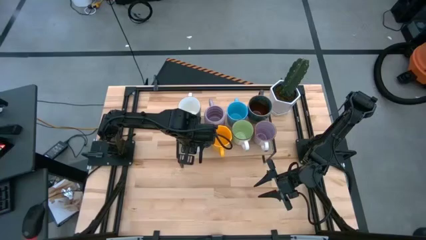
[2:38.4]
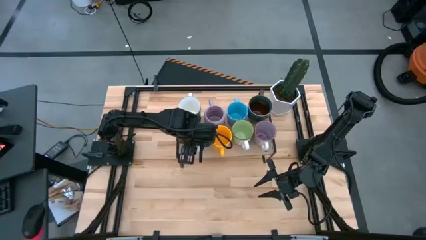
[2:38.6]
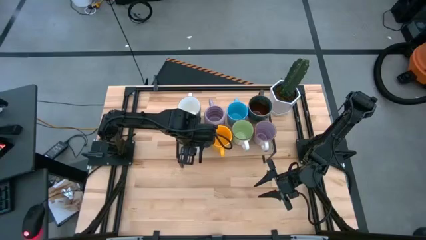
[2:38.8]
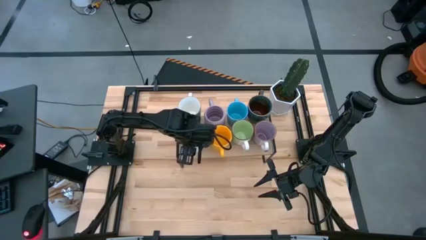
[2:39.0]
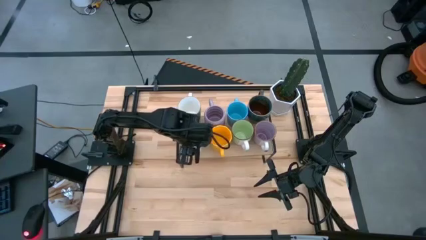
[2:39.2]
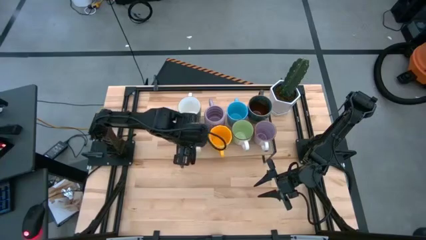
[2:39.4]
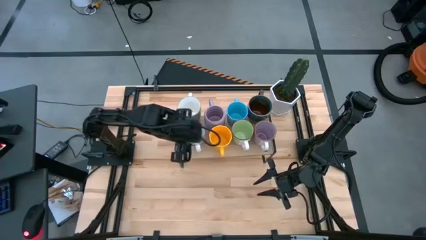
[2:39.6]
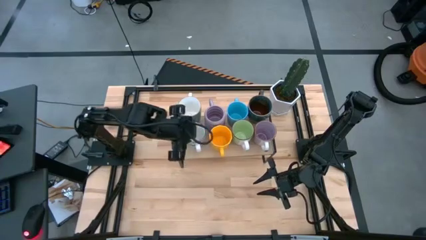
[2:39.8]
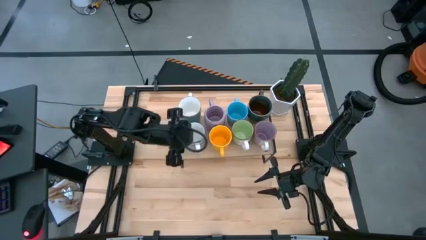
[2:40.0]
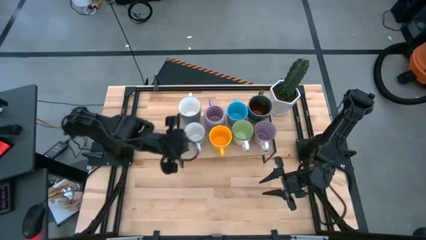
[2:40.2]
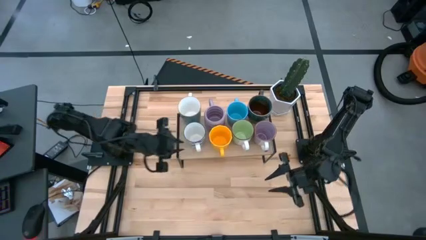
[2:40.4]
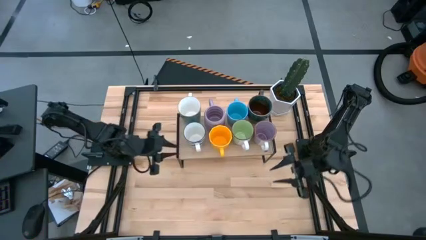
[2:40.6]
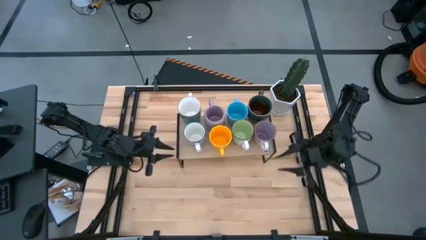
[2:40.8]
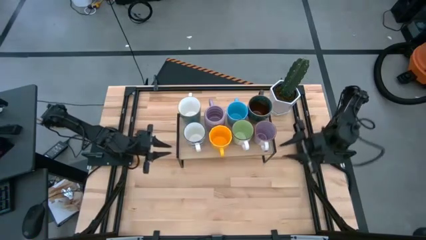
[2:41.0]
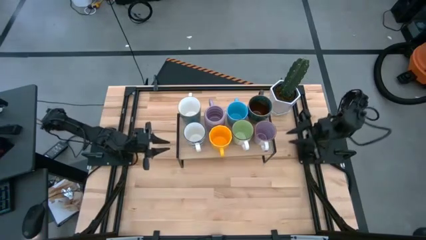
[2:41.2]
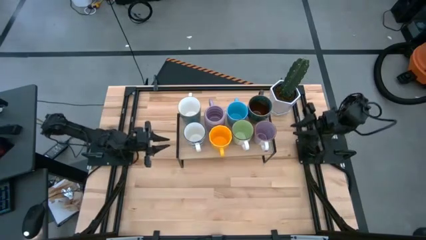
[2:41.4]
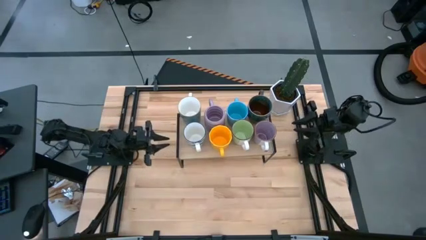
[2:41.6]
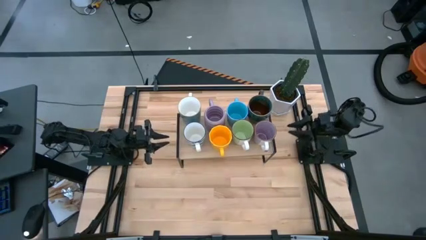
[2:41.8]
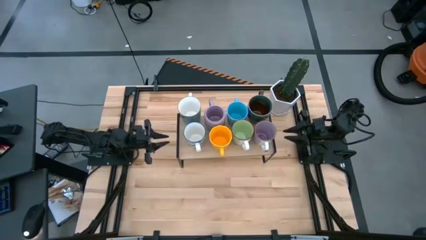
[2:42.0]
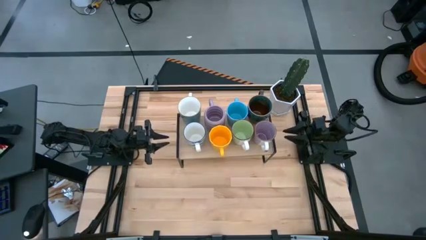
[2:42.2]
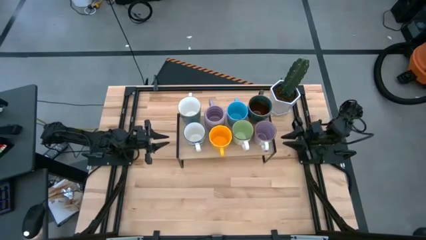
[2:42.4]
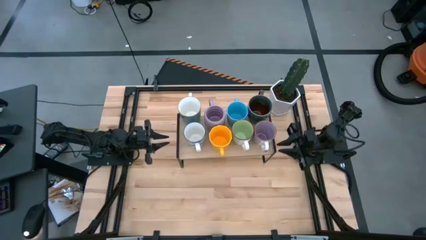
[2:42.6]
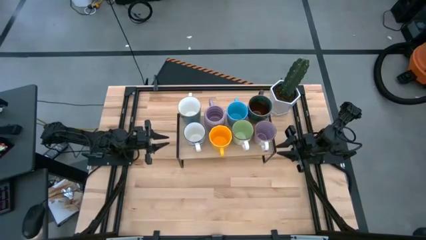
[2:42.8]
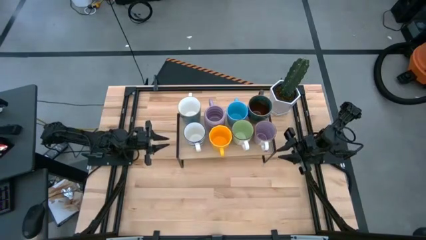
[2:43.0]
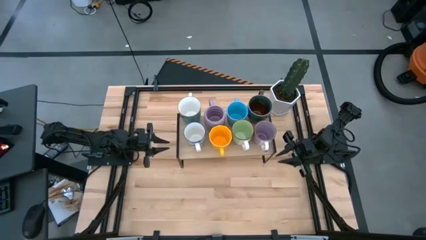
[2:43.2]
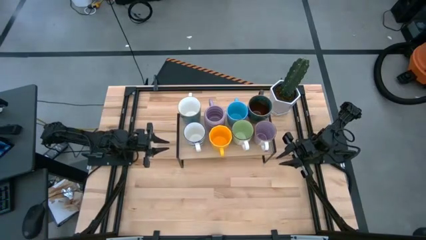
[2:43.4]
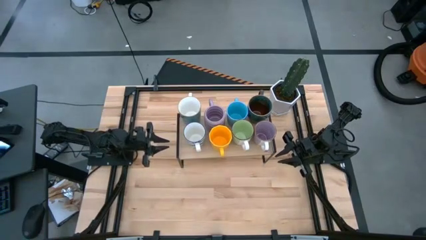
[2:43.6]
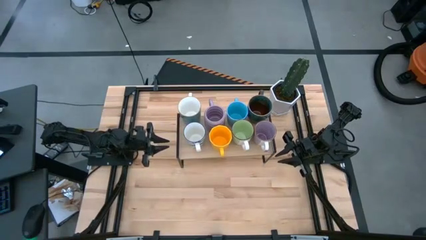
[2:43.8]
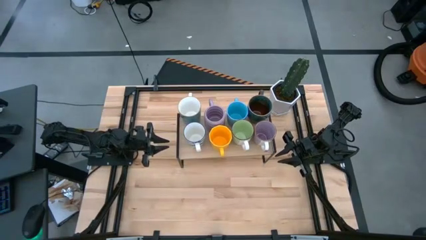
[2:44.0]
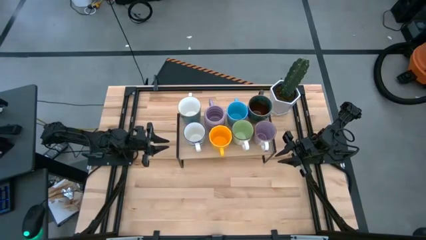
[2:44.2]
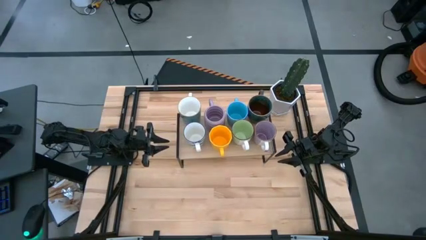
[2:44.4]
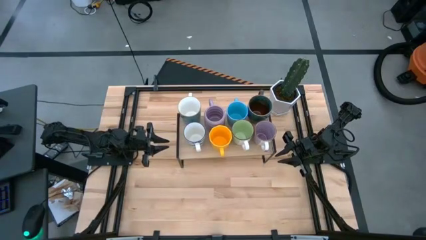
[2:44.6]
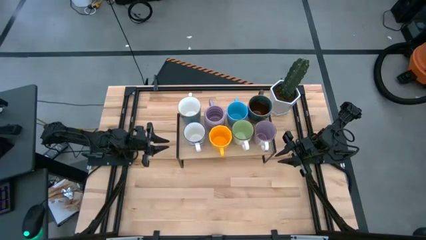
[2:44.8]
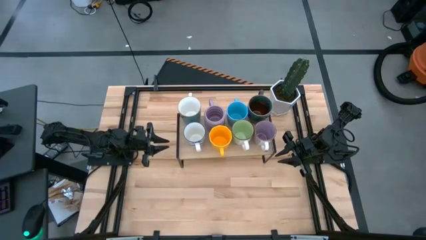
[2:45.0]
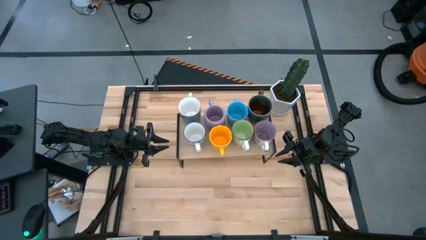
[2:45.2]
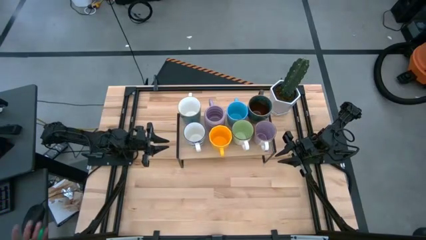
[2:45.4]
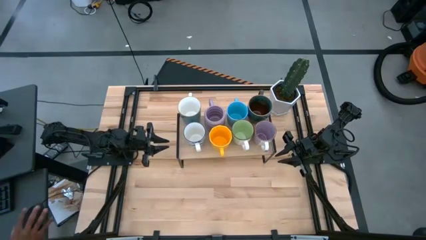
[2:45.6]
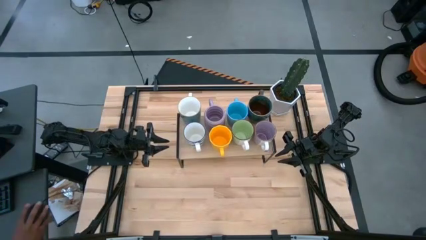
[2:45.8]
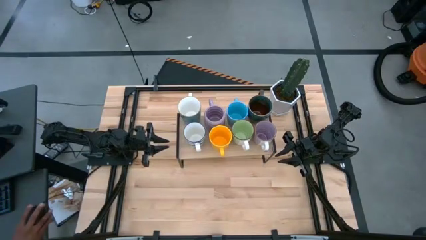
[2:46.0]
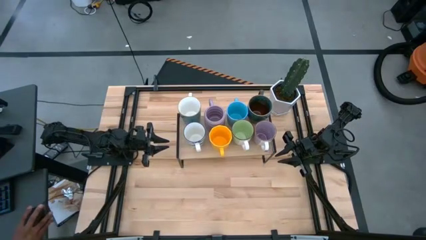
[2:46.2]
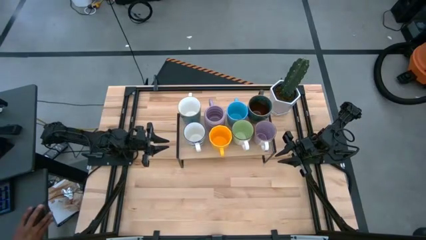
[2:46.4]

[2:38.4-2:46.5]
Task: Place coffee mugs
Return to Home Position

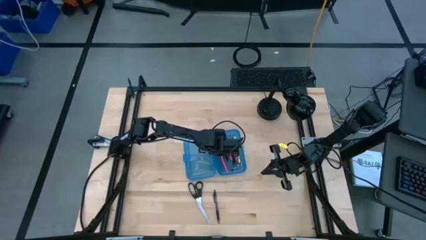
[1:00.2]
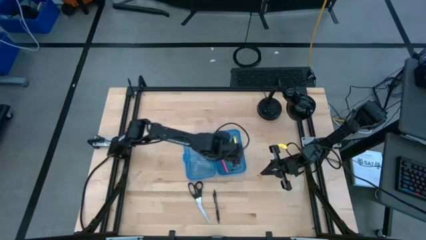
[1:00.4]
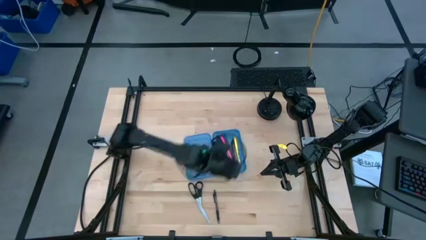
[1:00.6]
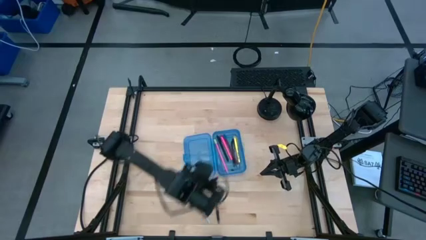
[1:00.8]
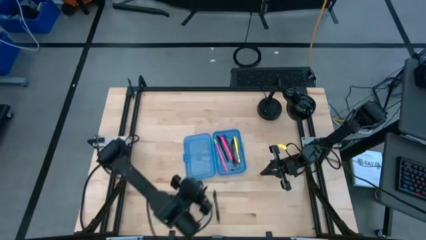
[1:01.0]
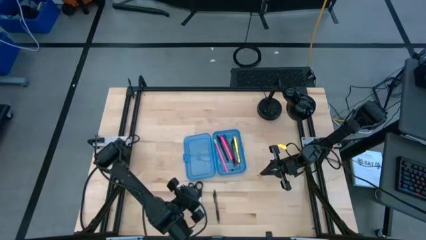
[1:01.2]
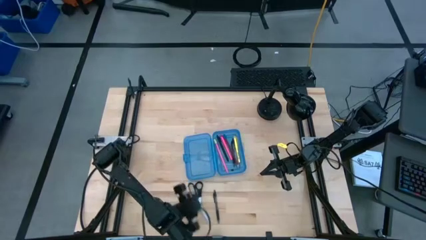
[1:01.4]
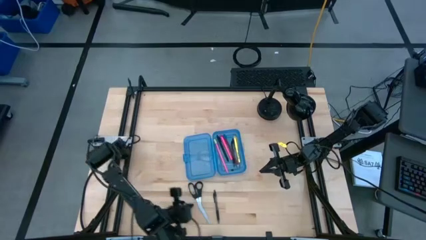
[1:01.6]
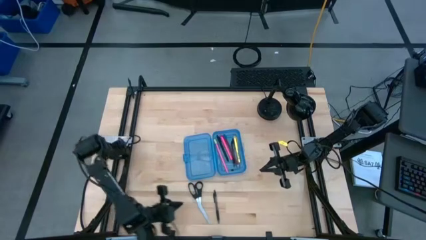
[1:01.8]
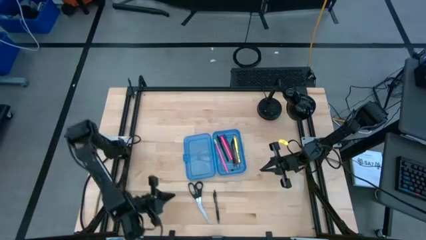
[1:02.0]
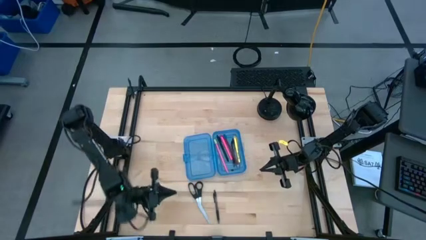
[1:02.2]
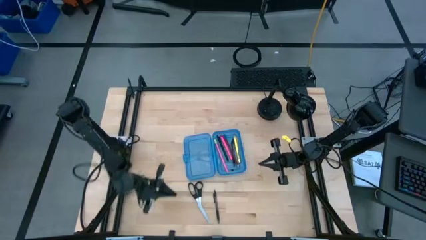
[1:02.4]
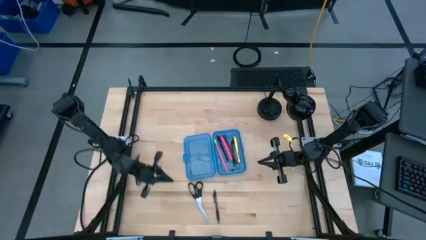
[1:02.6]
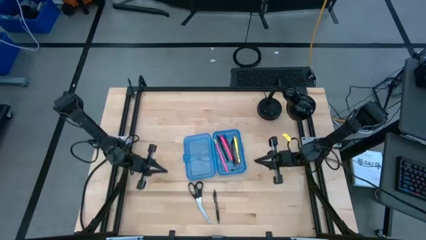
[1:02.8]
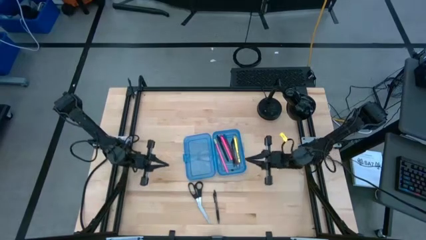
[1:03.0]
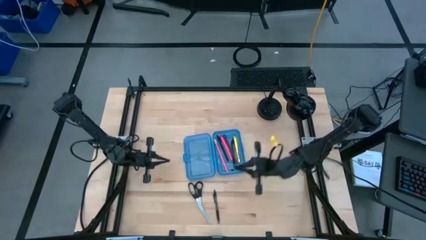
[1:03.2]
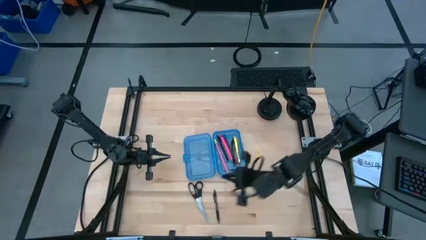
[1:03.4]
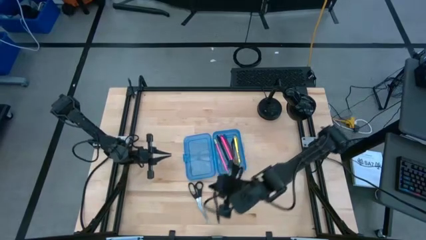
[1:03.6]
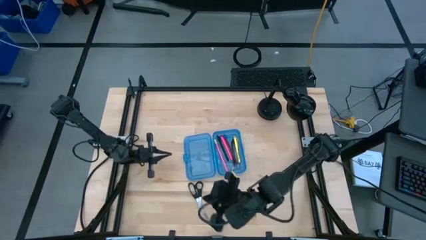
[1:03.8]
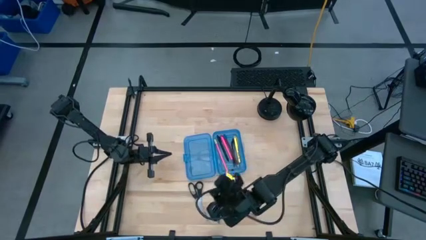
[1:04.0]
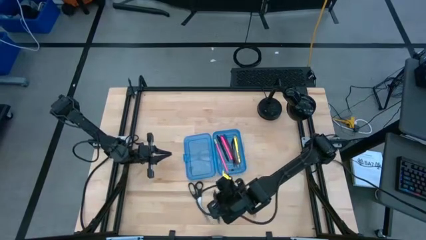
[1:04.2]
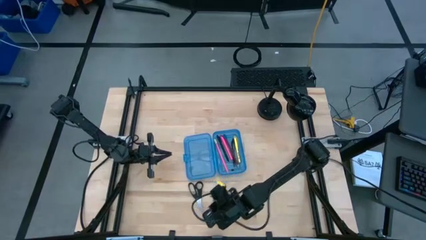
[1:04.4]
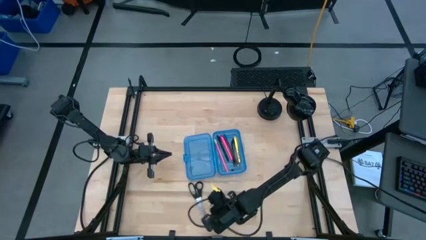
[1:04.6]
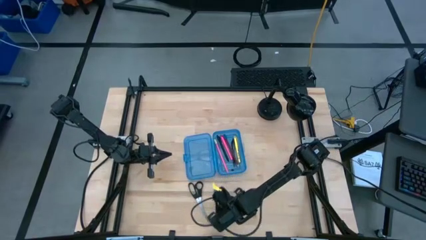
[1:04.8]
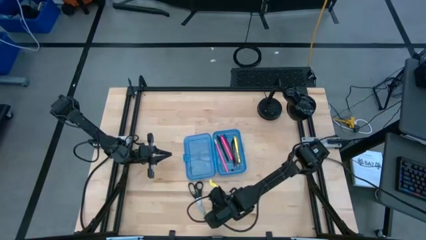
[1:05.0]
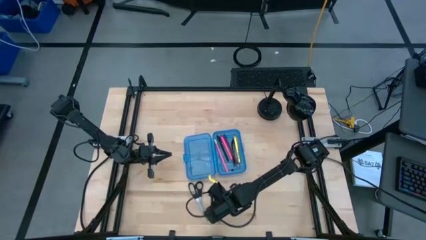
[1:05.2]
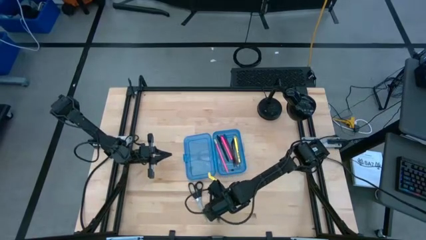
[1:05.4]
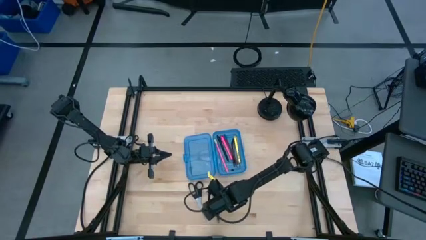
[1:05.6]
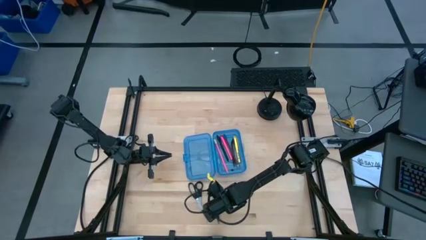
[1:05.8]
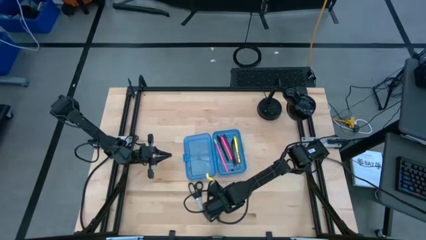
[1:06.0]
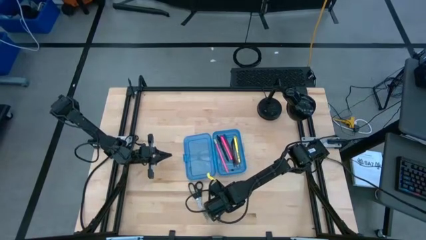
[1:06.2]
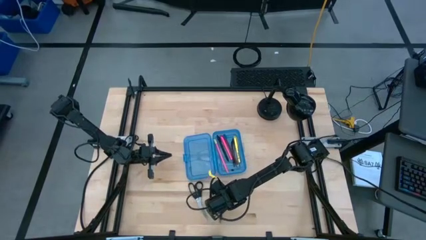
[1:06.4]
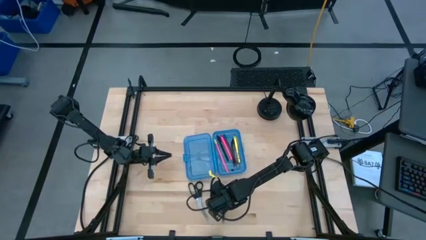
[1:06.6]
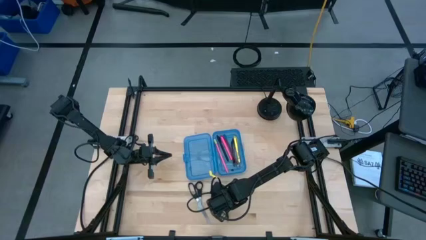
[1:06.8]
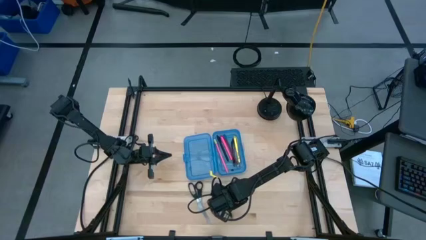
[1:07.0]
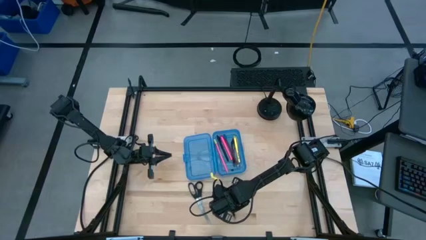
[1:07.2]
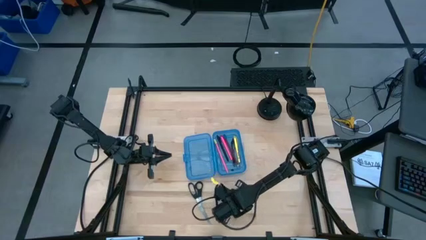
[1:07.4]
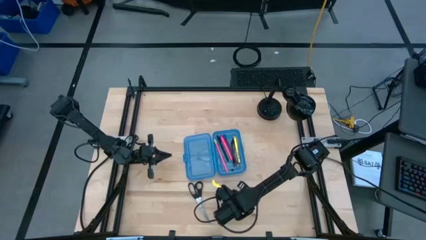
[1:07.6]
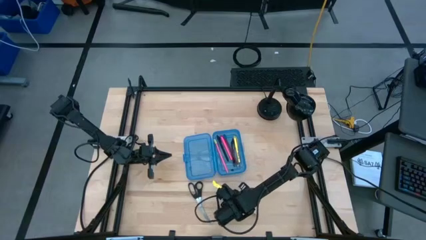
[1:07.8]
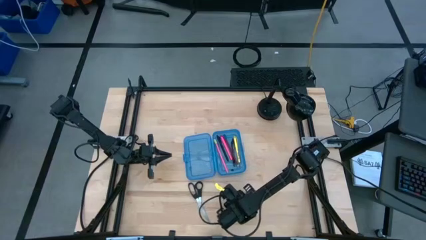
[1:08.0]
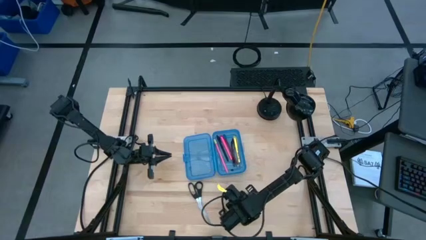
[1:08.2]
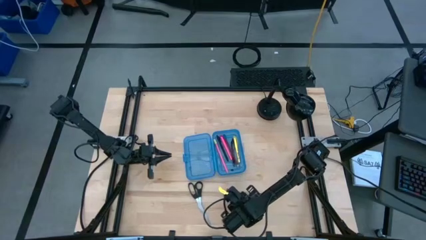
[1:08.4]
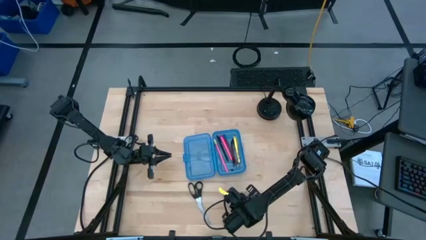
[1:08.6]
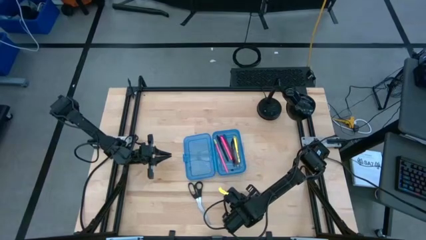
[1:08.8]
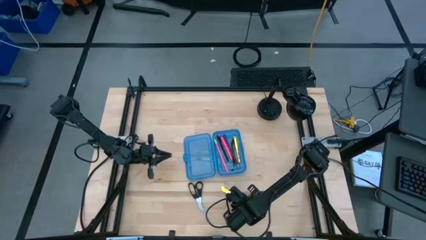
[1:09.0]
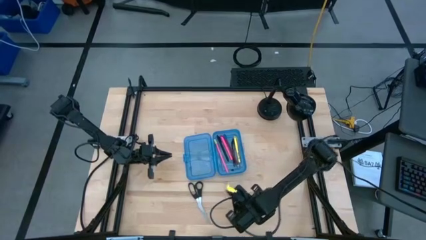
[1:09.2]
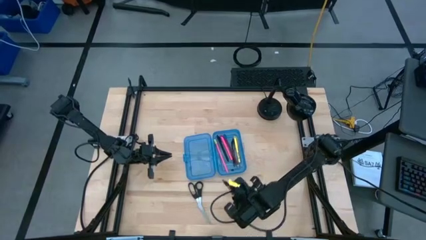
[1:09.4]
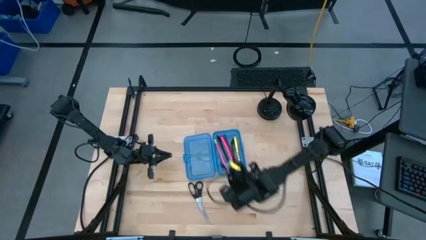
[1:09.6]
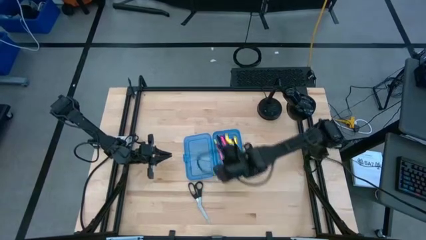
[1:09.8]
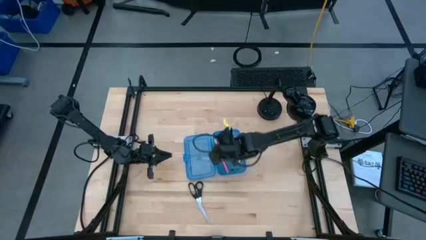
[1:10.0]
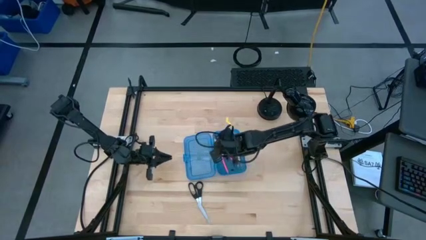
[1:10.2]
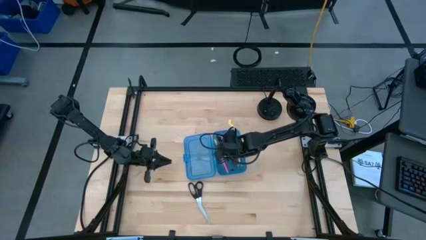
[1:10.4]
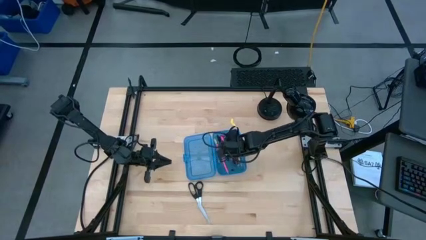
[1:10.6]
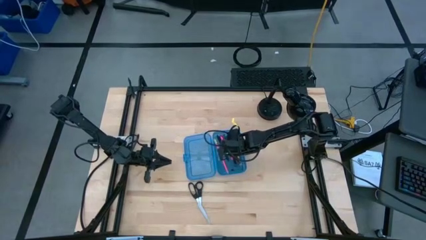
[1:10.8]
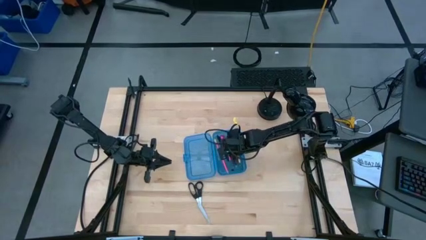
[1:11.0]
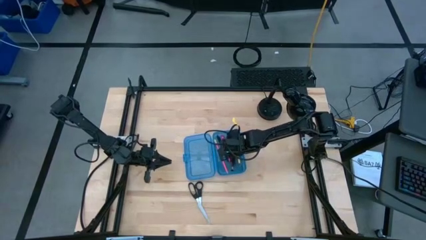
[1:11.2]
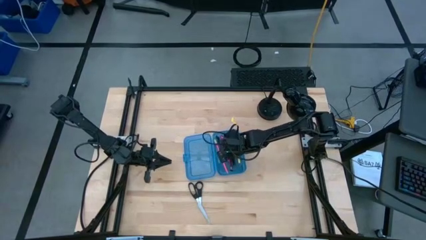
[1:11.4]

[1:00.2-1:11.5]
Task: Pick & place school supplies into a supply box
Put the black transparent pen into the blue supply box
